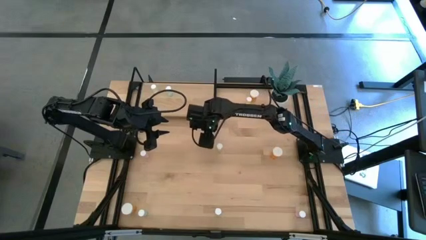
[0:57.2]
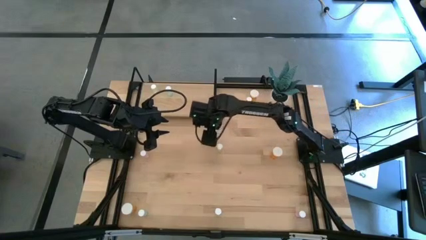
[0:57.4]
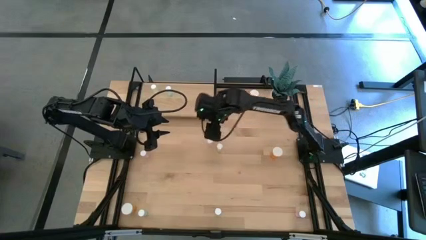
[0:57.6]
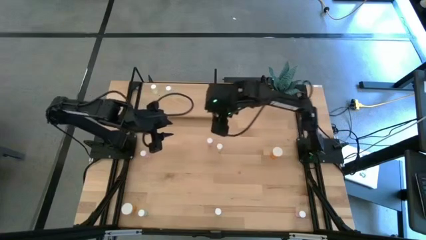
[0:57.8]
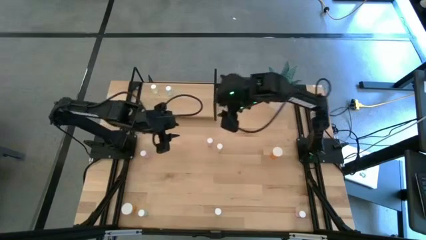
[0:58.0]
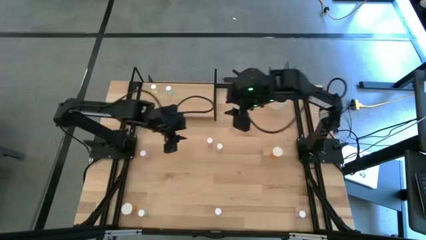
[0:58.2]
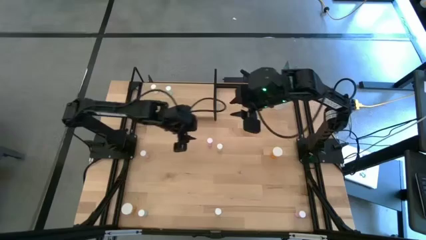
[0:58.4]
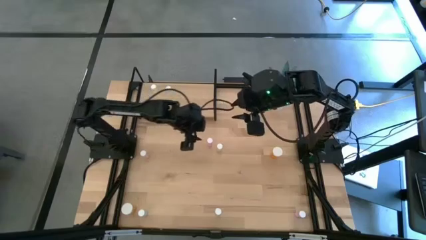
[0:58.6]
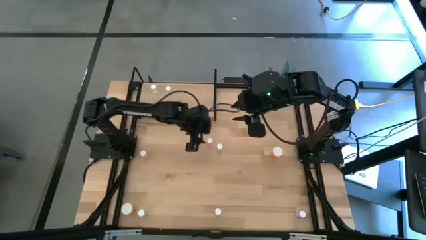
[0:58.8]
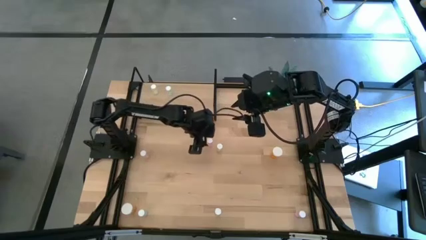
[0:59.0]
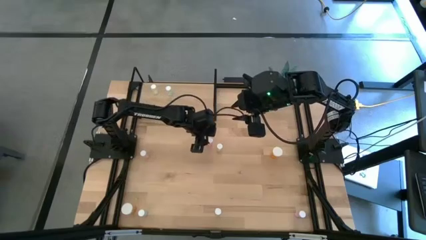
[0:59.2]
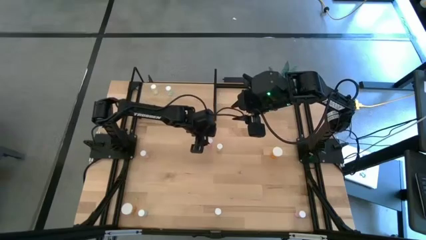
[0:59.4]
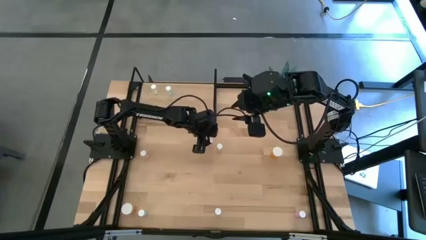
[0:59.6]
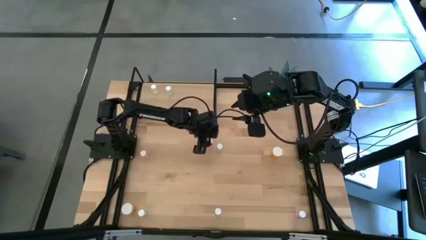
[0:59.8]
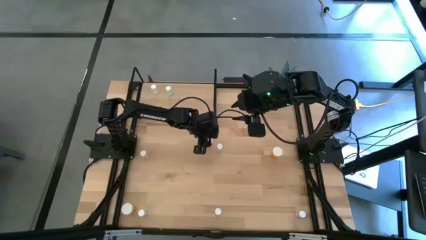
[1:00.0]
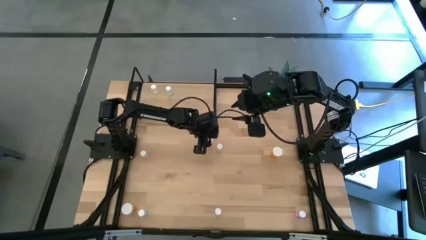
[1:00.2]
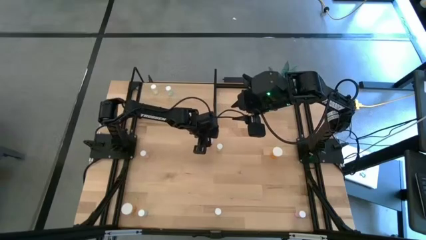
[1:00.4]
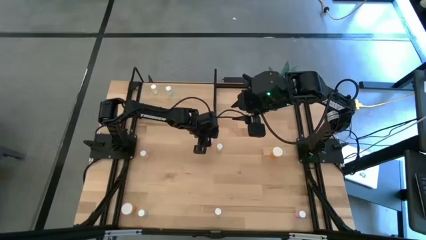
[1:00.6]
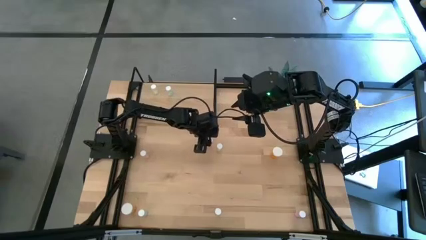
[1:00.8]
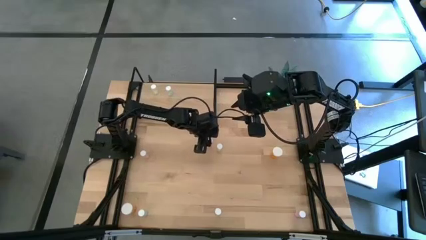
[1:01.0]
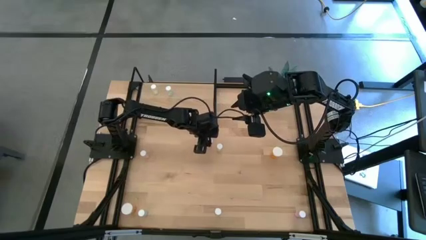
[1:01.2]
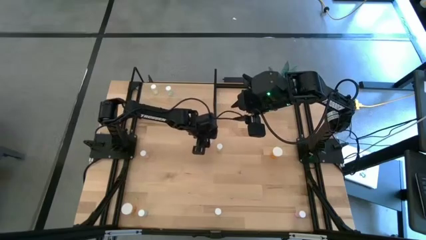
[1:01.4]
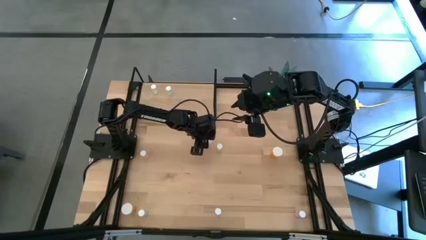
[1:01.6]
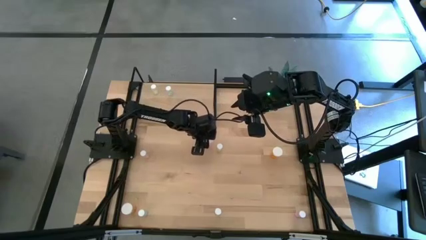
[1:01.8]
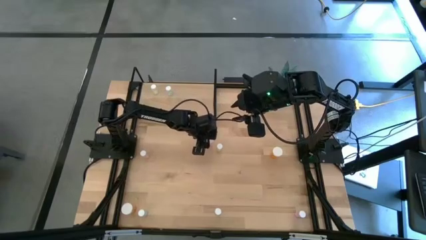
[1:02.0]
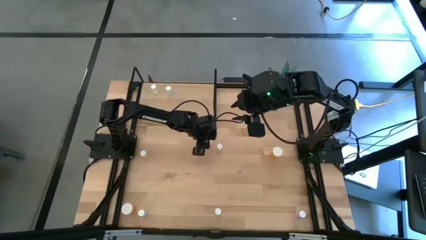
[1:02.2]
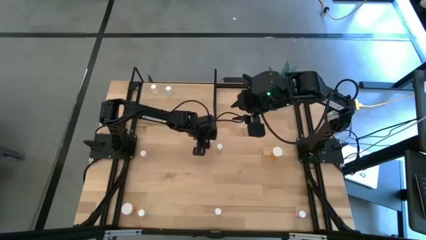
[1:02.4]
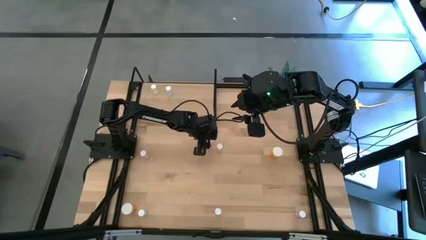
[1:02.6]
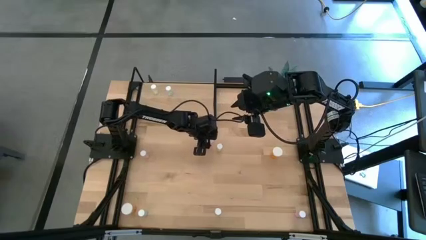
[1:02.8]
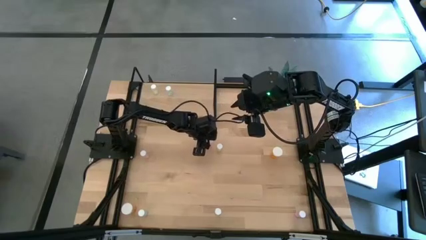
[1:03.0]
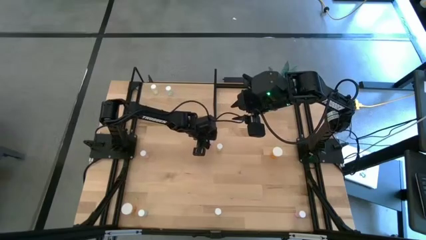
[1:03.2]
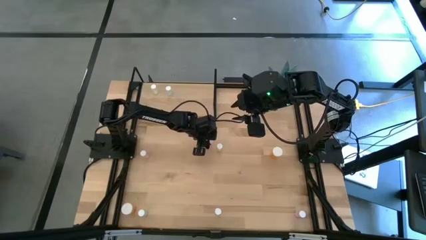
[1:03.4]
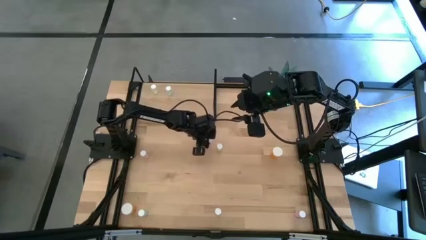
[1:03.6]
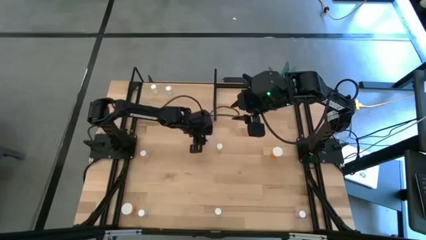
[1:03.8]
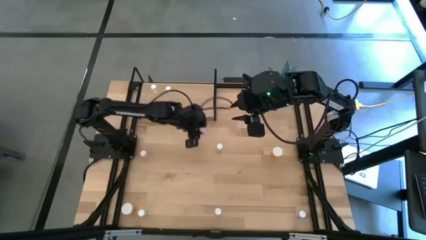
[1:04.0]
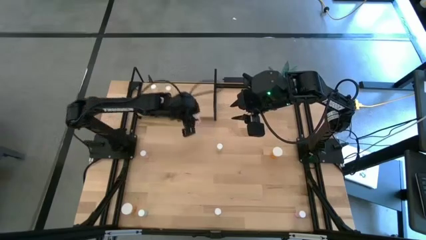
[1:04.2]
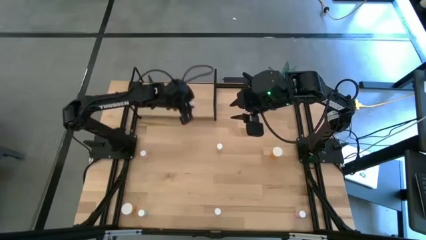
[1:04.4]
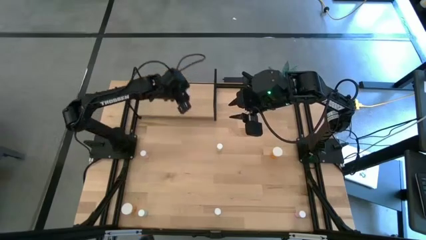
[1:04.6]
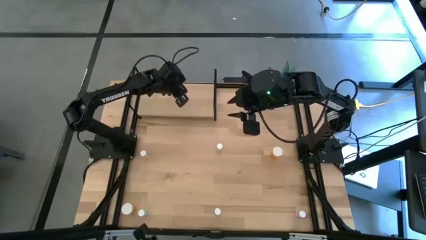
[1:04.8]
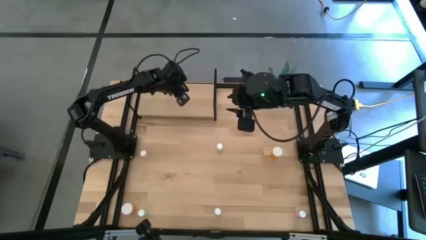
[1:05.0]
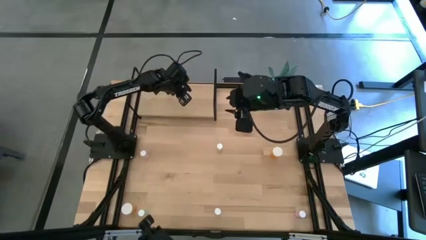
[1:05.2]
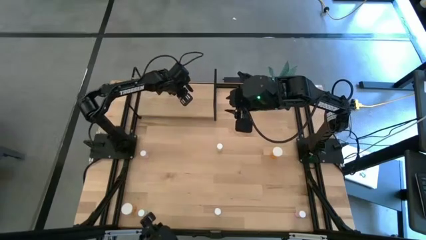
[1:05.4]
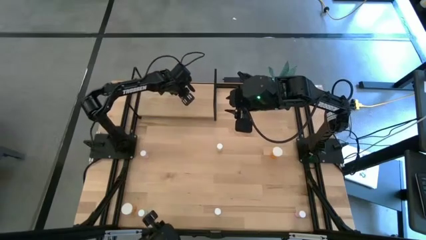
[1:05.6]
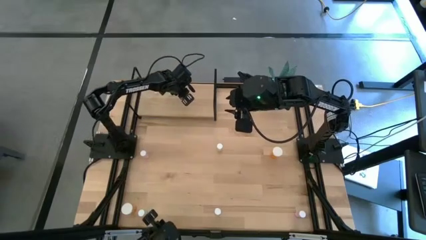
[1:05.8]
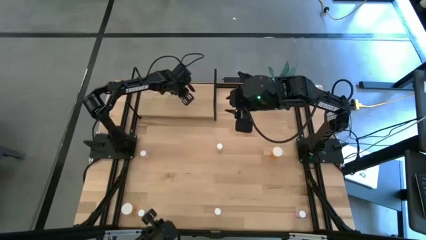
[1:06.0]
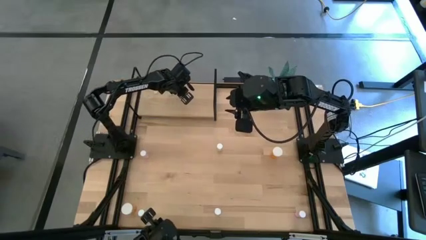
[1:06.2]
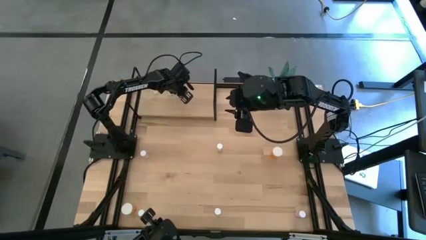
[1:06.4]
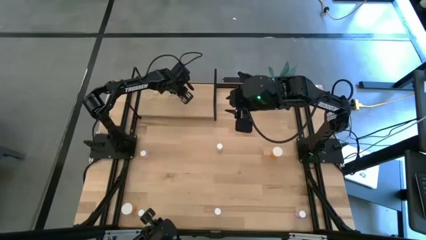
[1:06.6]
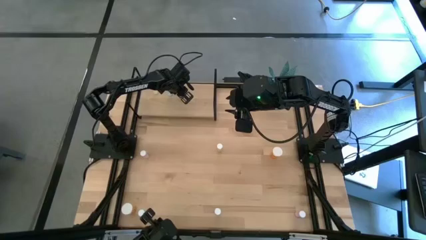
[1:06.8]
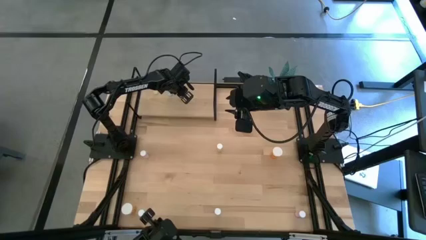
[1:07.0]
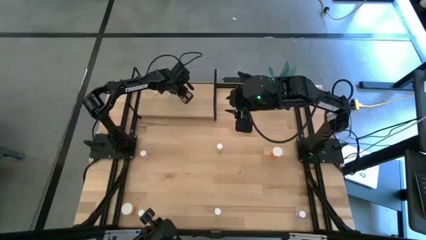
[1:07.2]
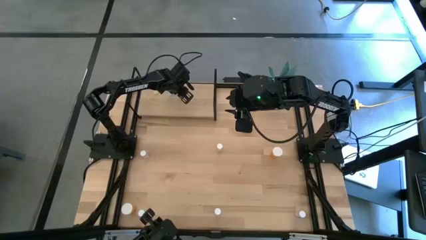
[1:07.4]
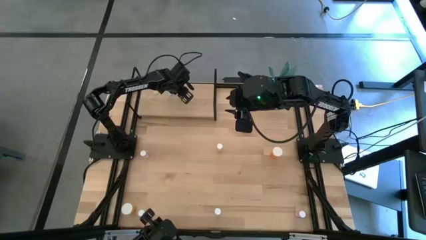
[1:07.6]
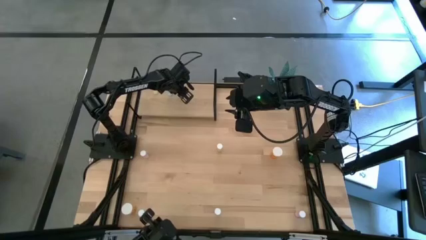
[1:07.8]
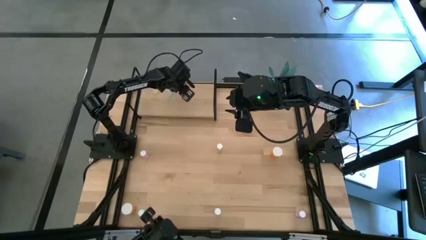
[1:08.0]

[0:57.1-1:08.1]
Task: Pick and place medicine bottles onto shelf by color
Put the top right pink pill bottle on the shelf

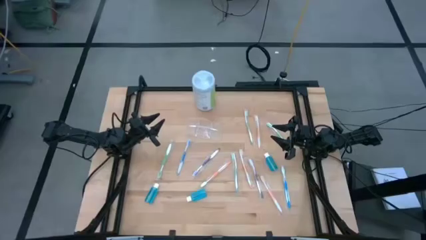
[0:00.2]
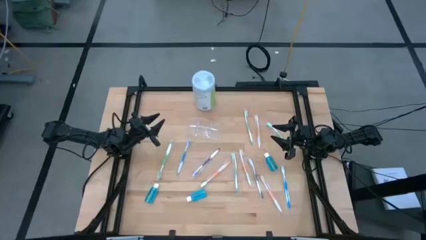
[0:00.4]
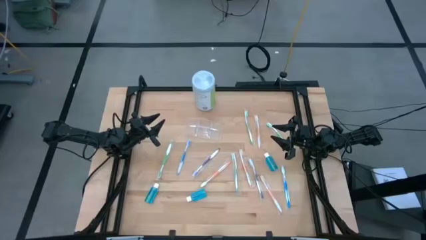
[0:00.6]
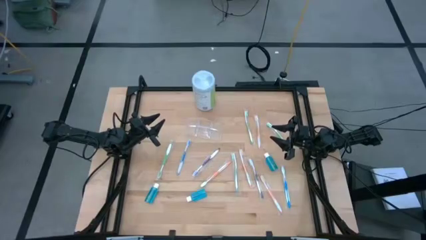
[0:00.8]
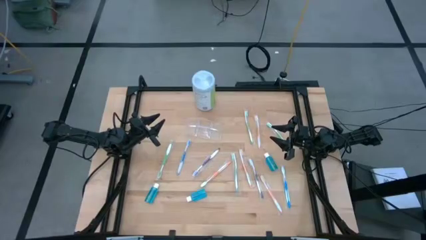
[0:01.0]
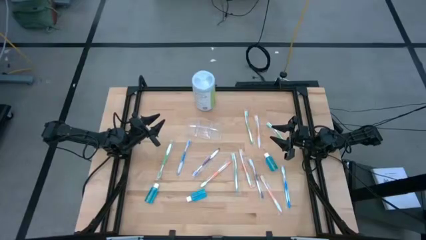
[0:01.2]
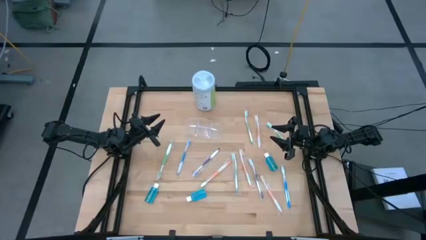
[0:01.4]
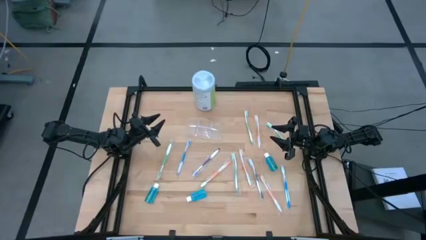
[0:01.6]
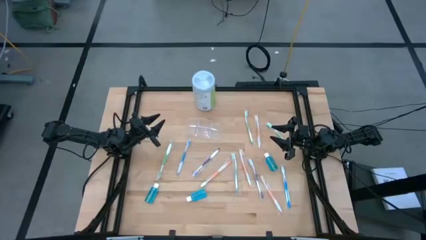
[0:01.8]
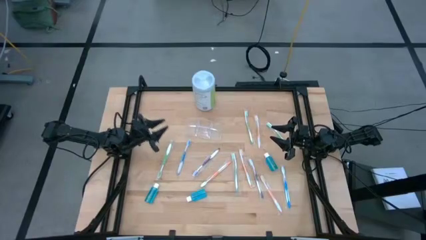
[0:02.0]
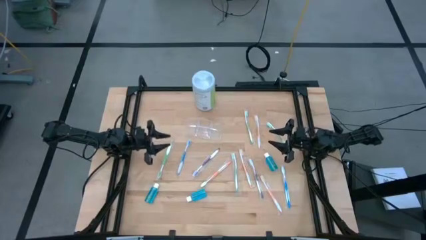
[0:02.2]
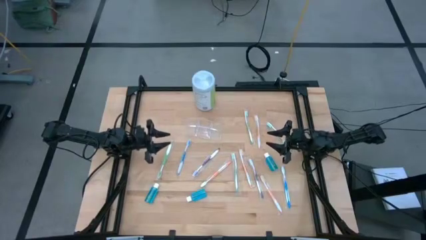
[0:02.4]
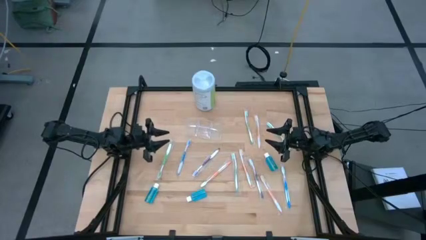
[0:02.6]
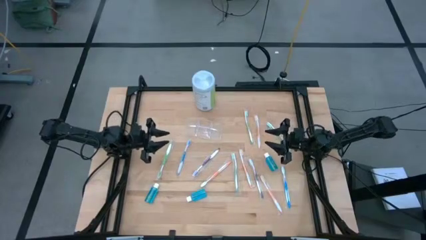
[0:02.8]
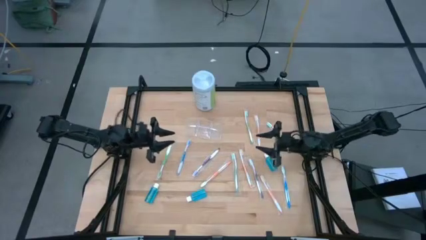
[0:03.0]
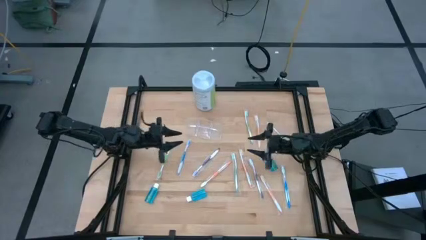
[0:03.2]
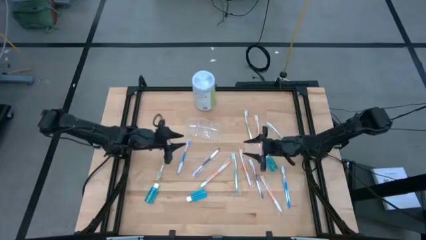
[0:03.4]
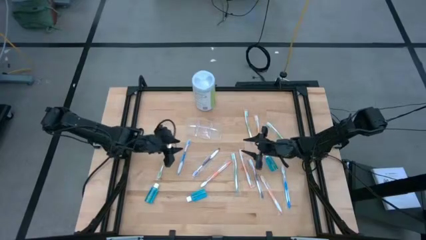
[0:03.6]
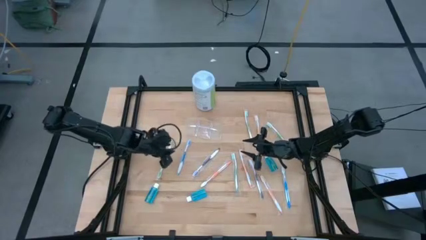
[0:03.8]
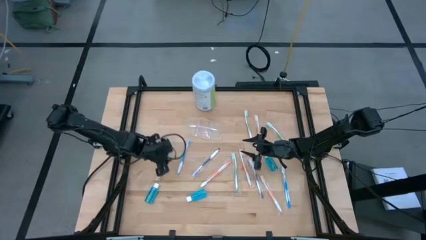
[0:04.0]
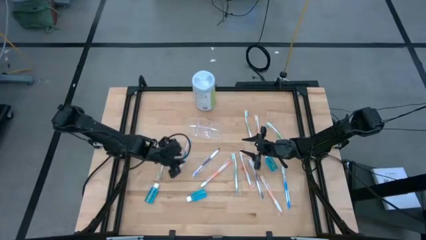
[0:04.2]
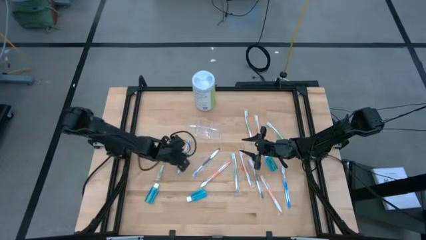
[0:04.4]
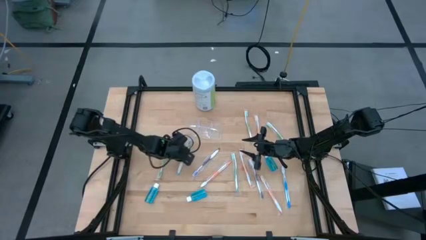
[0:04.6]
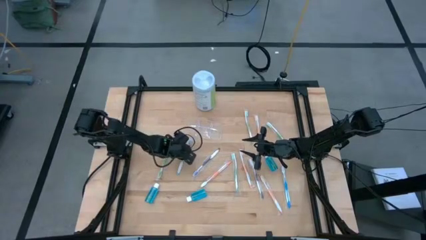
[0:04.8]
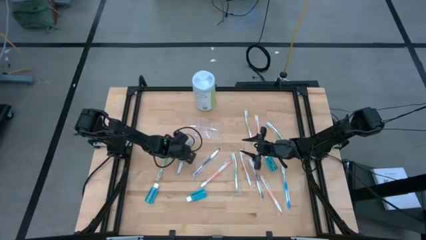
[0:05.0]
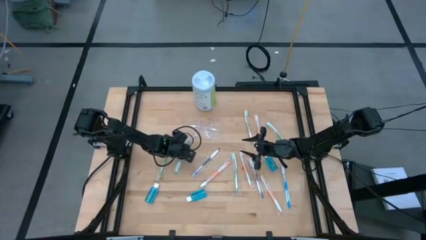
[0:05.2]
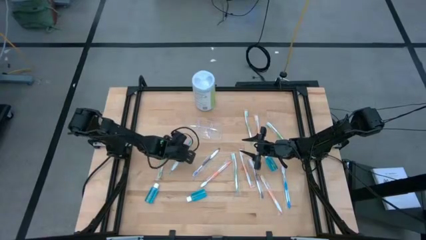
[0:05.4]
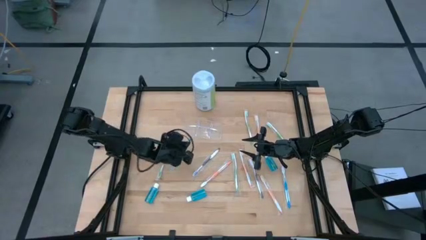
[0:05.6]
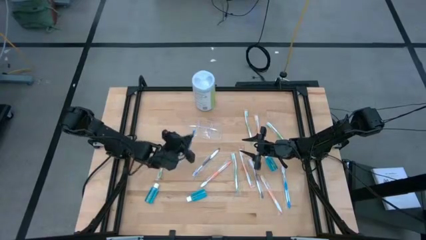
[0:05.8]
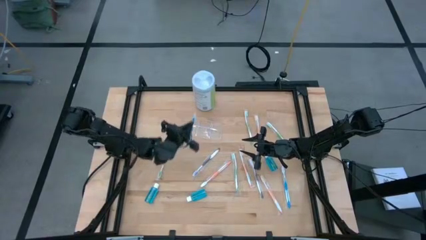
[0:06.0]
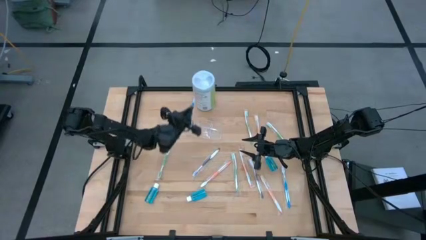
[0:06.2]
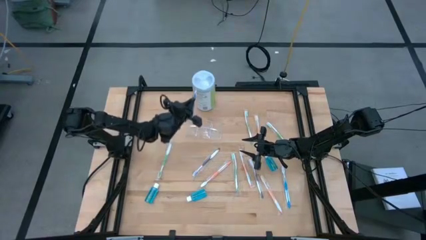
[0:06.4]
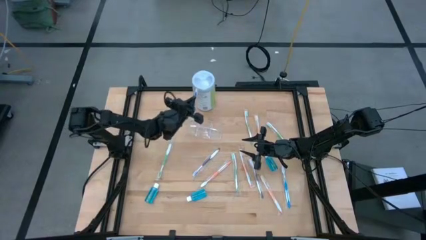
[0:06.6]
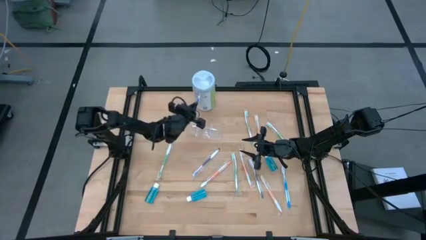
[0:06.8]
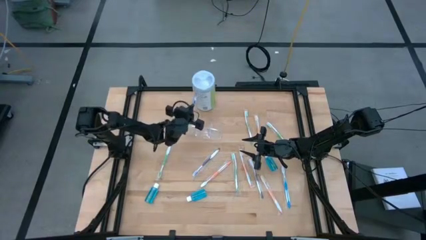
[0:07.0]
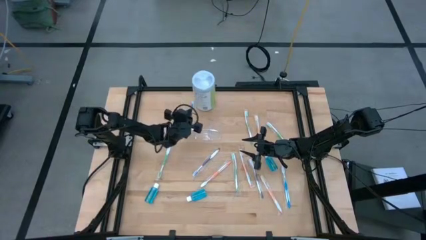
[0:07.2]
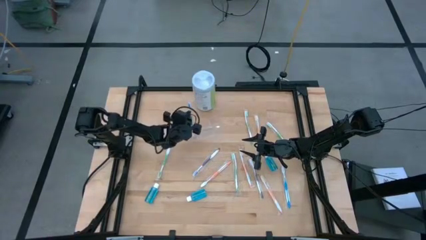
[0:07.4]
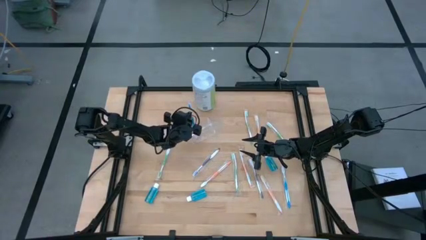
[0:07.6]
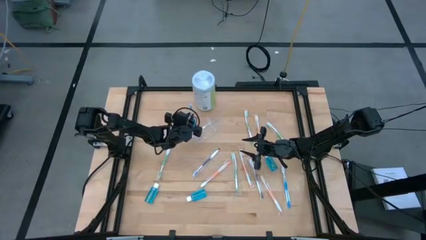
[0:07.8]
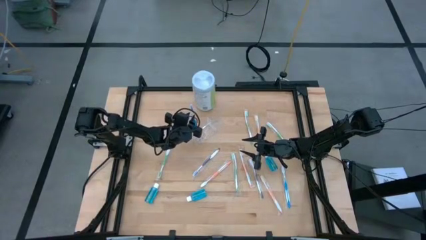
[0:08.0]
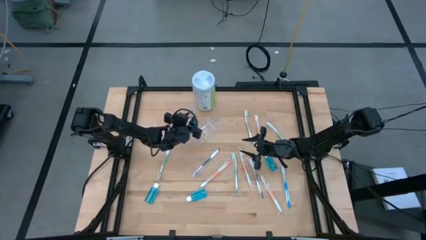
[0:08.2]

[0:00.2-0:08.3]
Task: Pick & Place toothbrushing station
Put the blue toothbrush into the transparent organizer
